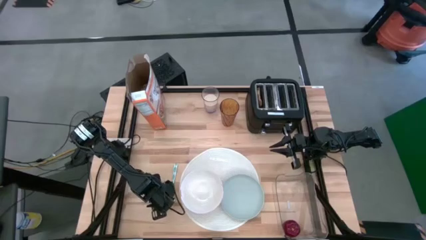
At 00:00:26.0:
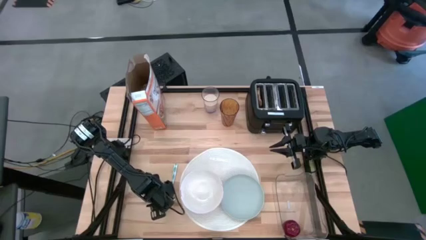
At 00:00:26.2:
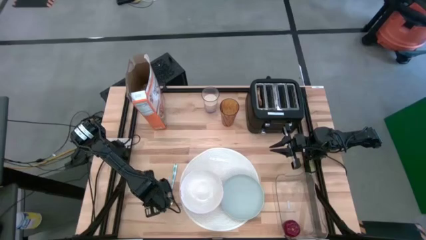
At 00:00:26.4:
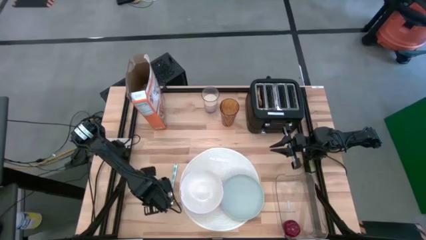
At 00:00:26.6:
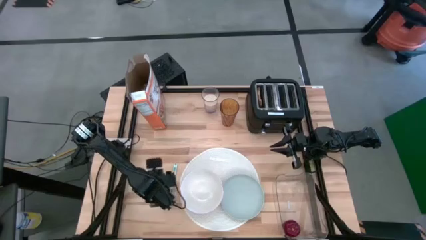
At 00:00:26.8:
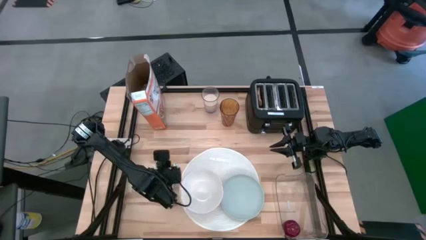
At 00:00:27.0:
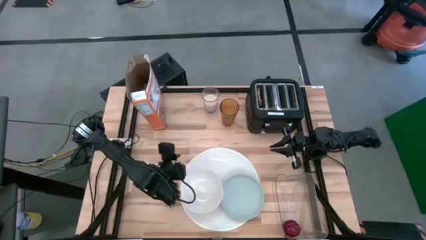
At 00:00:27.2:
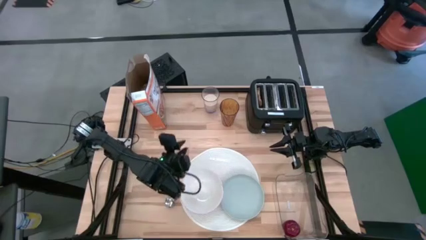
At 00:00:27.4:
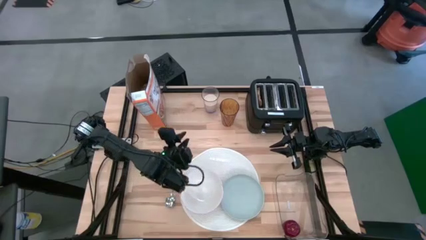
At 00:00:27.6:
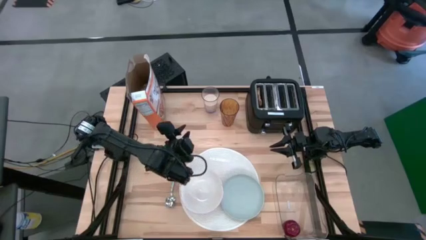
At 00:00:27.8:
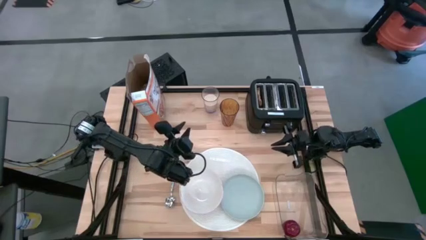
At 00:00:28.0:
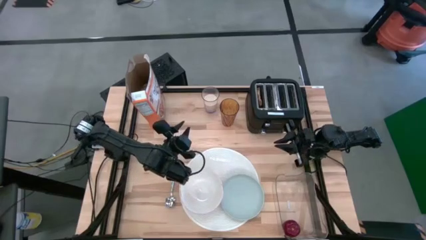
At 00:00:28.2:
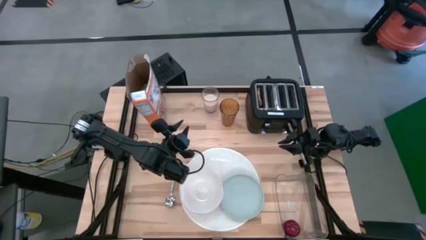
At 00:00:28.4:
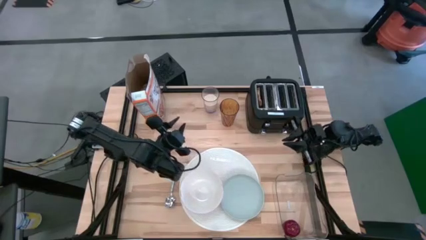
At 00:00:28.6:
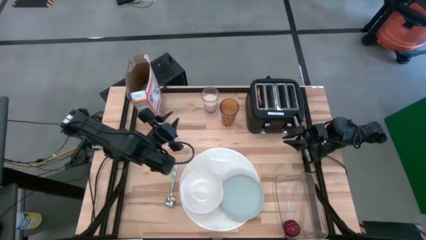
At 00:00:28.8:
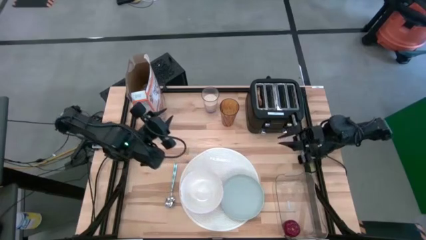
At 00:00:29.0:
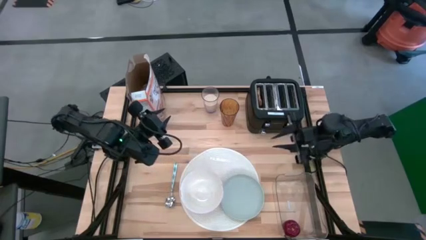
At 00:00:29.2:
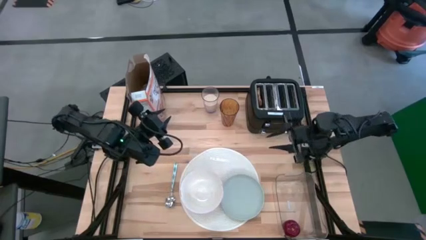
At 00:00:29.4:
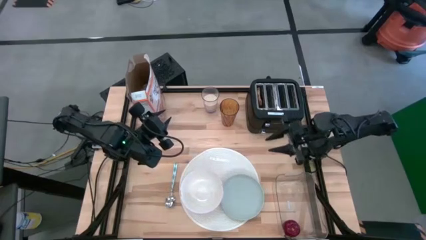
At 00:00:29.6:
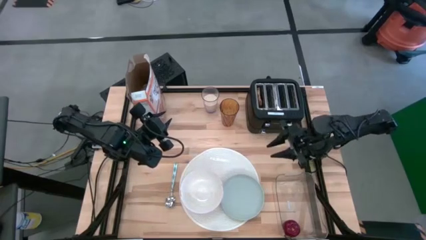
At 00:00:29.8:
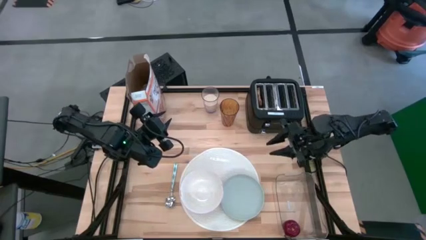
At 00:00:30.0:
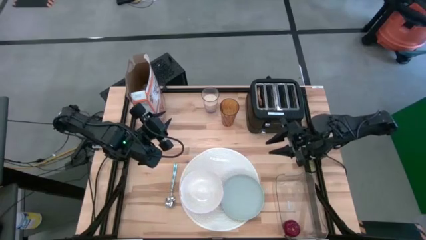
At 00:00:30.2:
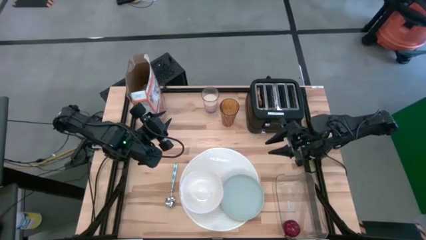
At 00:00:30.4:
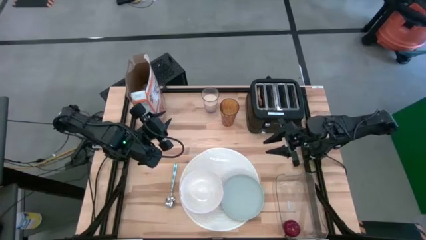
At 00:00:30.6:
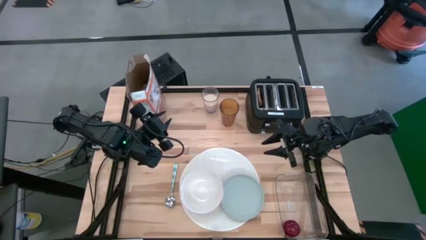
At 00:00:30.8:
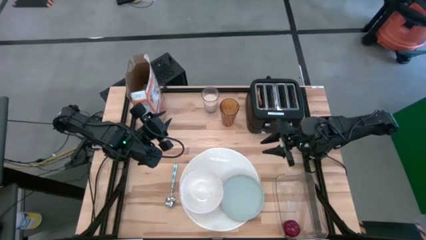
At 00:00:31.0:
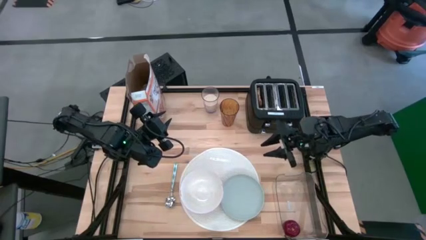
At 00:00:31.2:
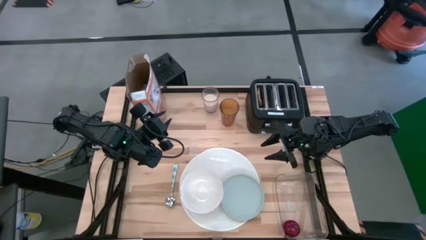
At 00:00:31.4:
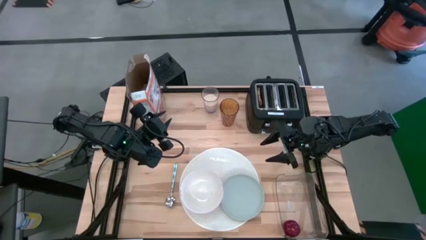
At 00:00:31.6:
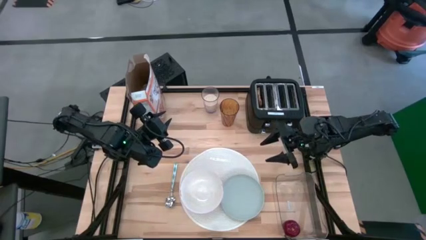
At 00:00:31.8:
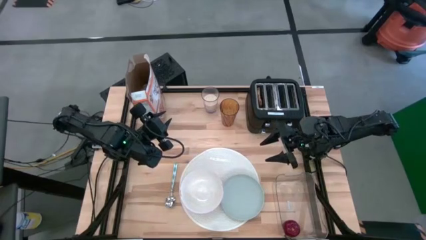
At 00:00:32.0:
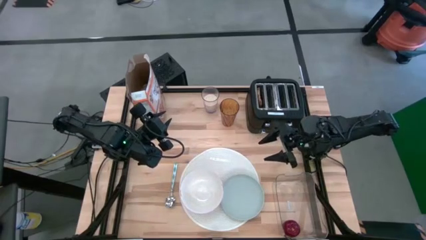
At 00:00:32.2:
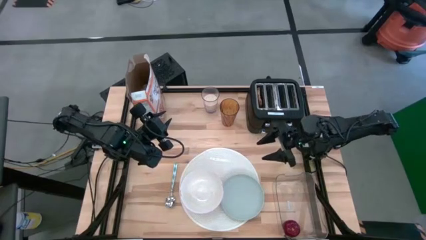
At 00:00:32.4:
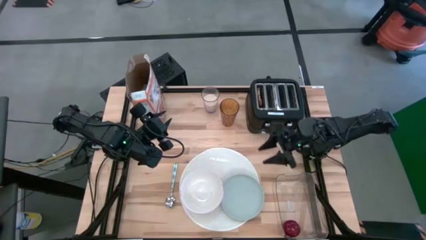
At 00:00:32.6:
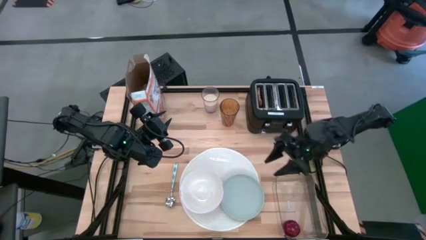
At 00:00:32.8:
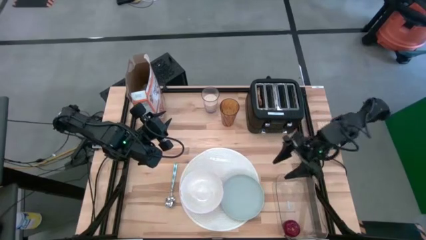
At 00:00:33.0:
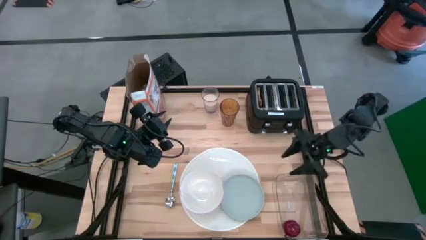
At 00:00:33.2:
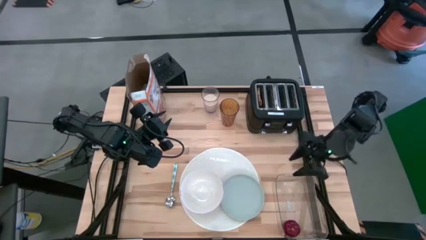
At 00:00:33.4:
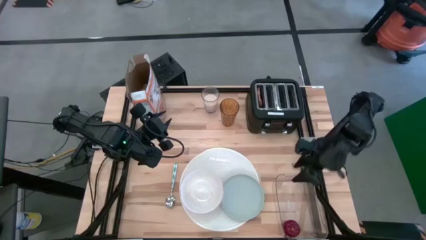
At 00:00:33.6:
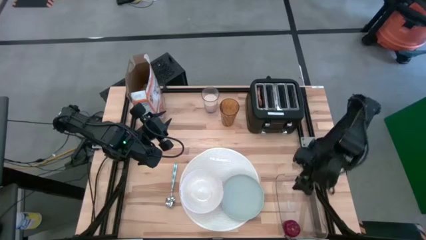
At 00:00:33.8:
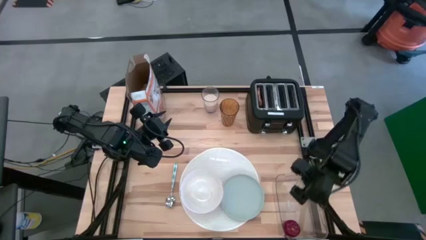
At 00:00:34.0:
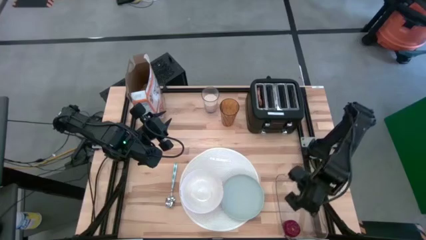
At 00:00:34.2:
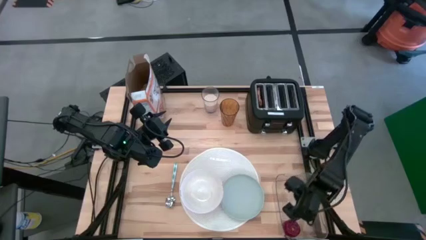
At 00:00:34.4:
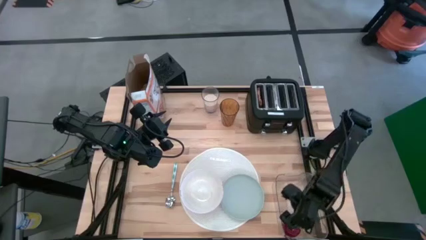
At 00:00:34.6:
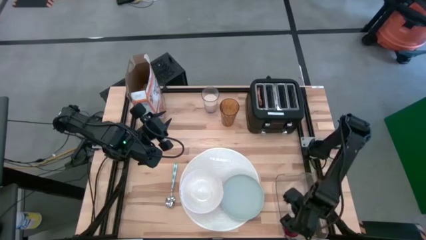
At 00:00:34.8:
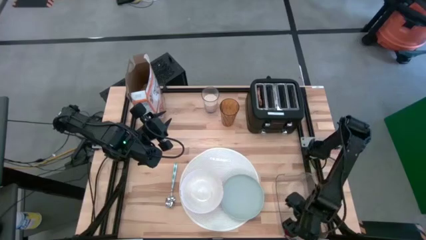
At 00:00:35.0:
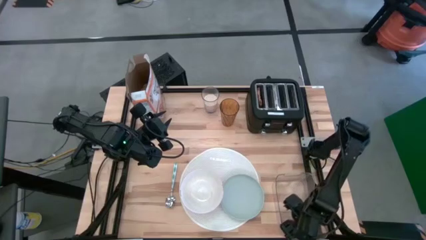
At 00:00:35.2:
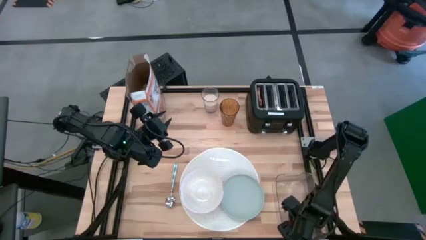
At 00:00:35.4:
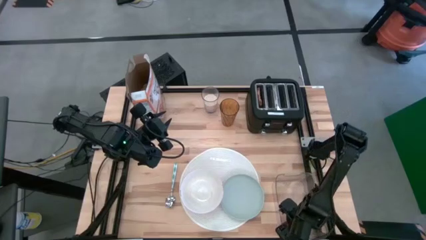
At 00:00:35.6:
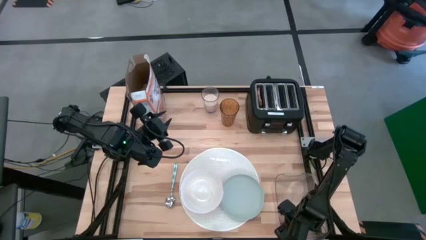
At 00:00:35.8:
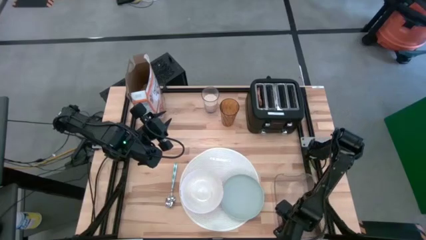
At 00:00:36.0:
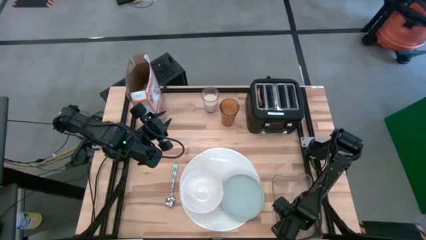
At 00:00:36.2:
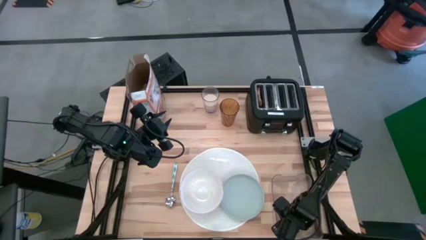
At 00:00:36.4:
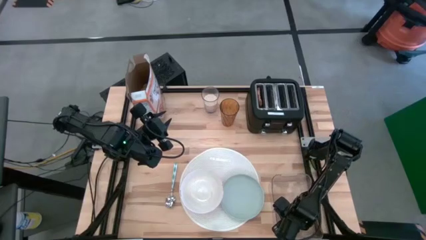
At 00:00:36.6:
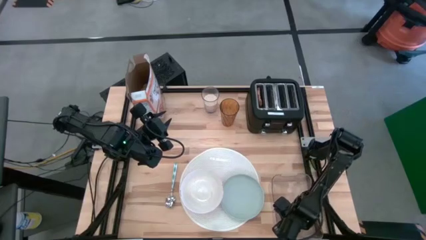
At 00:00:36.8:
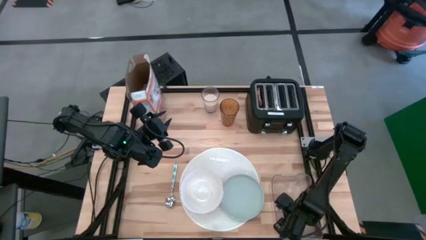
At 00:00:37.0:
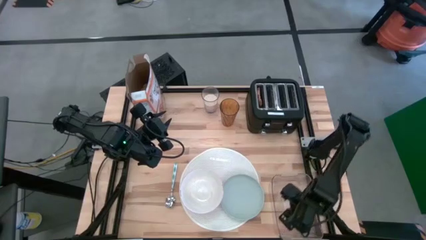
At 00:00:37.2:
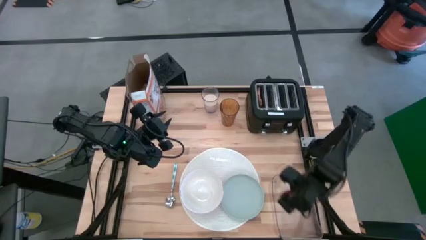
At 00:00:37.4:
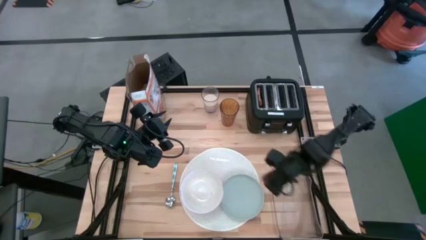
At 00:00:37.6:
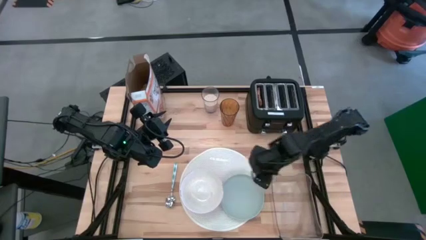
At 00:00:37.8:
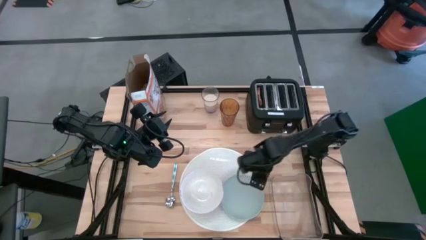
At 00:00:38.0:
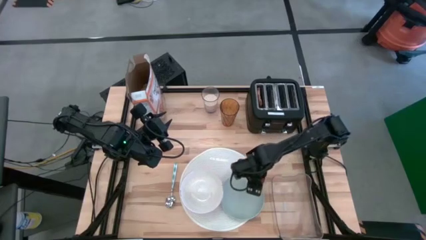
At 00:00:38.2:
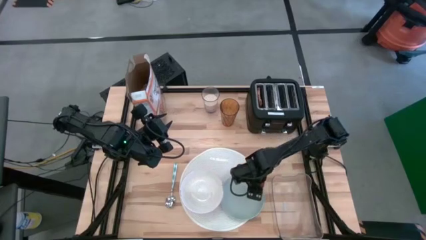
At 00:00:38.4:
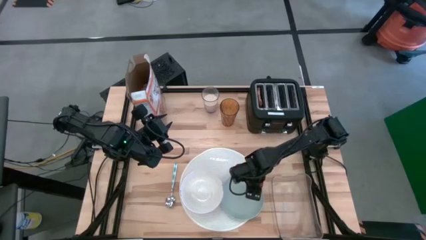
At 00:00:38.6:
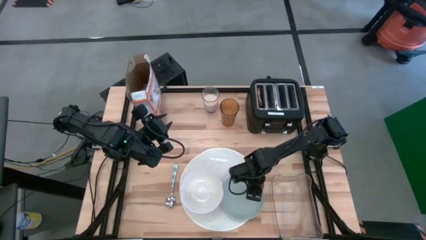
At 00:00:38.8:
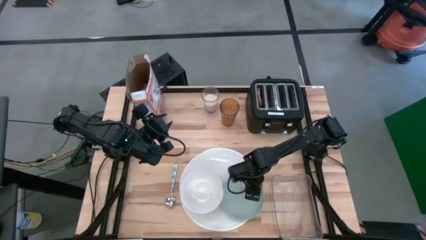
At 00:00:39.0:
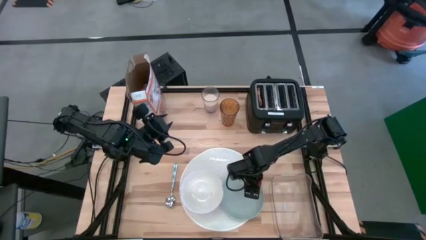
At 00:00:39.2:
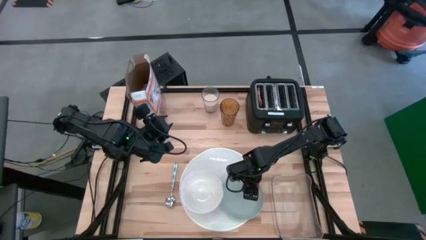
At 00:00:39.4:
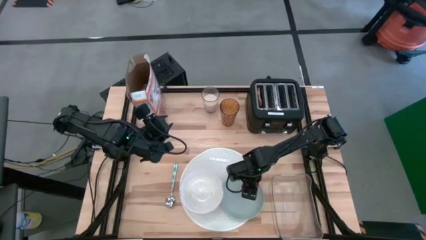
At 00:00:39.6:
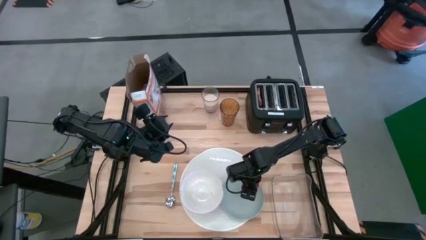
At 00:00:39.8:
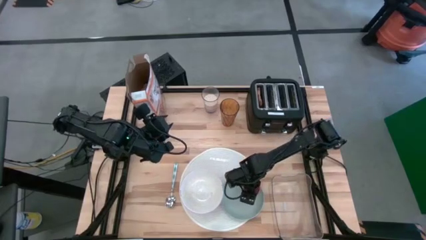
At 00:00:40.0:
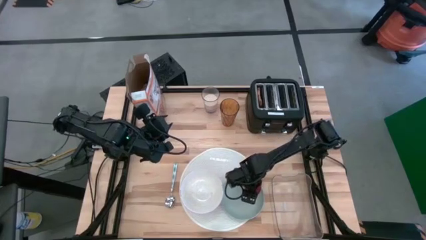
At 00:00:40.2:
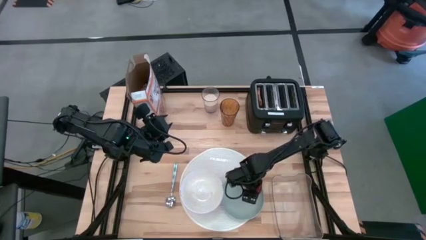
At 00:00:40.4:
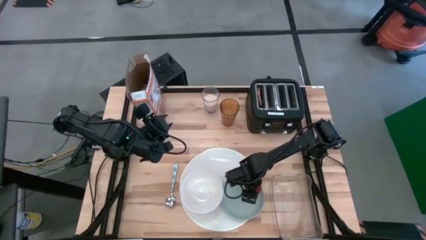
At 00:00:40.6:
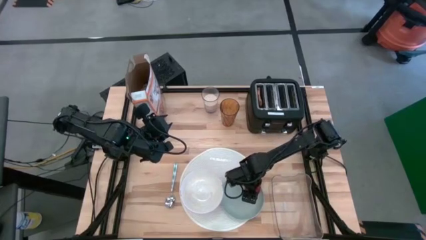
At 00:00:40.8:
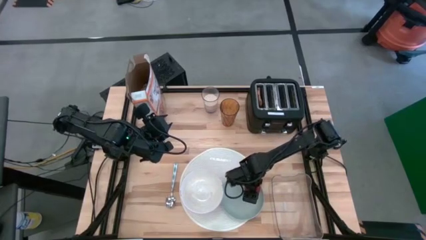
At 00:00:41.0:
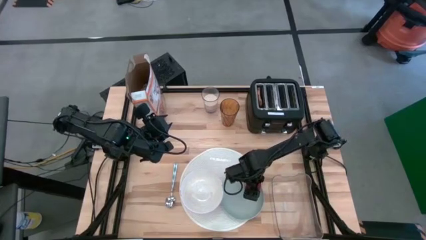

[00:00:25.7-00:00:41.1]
Task: Arrange a breakfast setting
Put the apple on the blue plate
